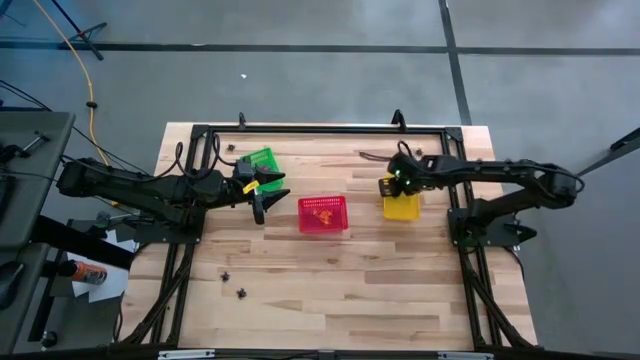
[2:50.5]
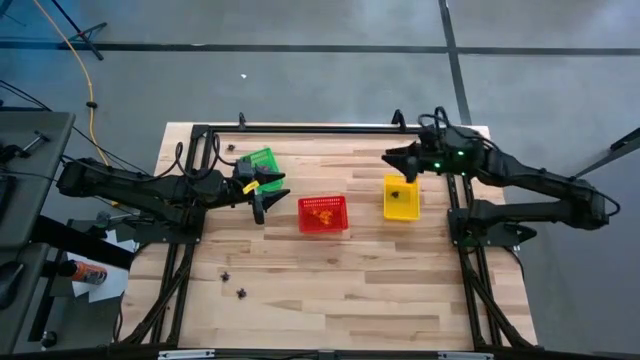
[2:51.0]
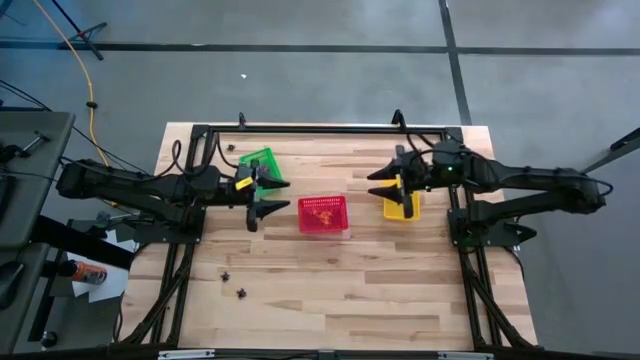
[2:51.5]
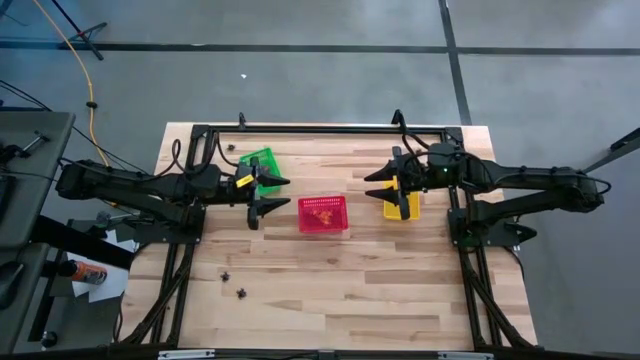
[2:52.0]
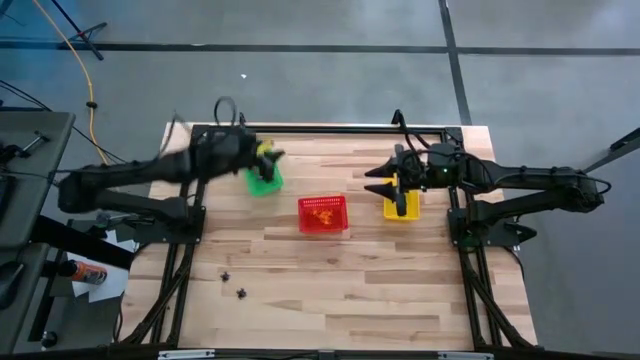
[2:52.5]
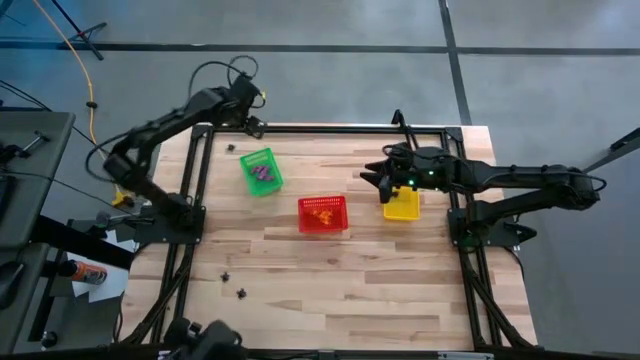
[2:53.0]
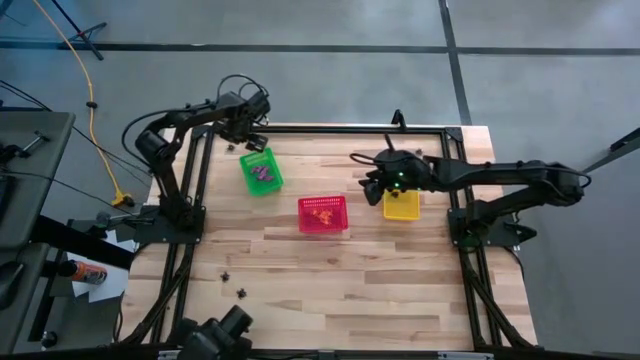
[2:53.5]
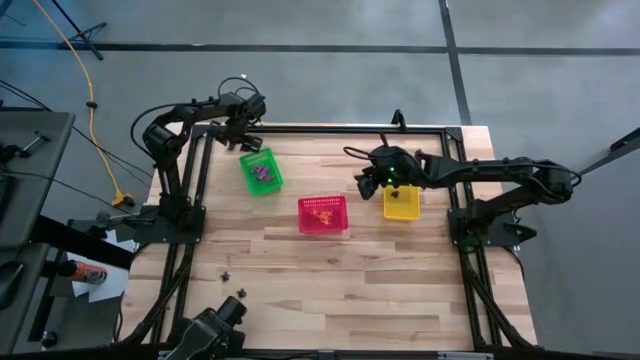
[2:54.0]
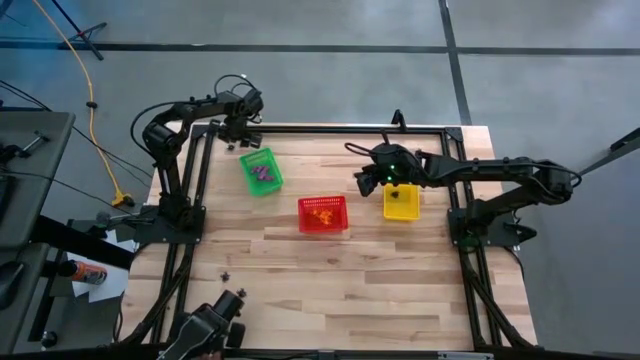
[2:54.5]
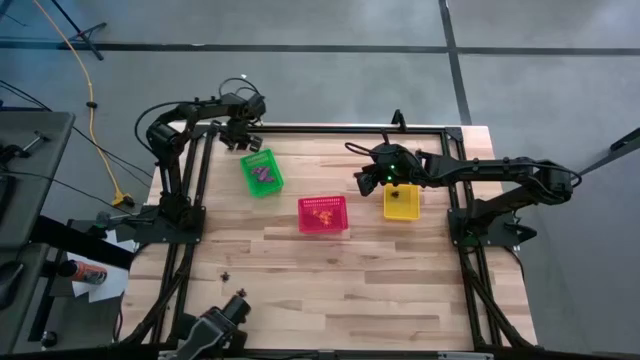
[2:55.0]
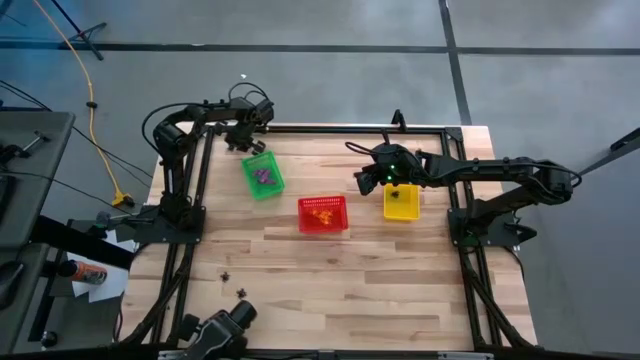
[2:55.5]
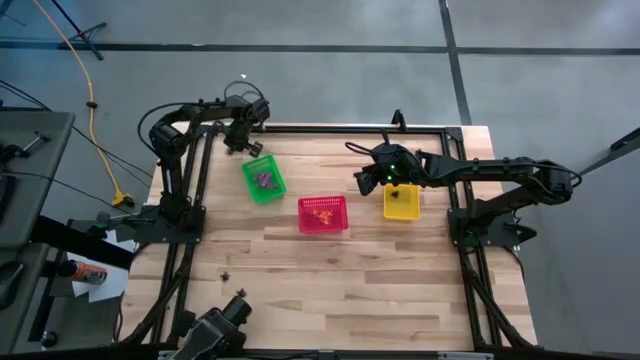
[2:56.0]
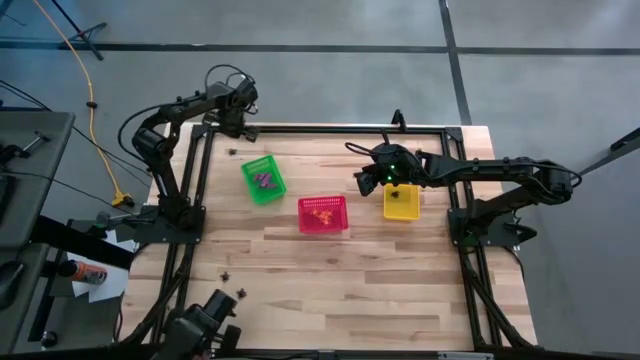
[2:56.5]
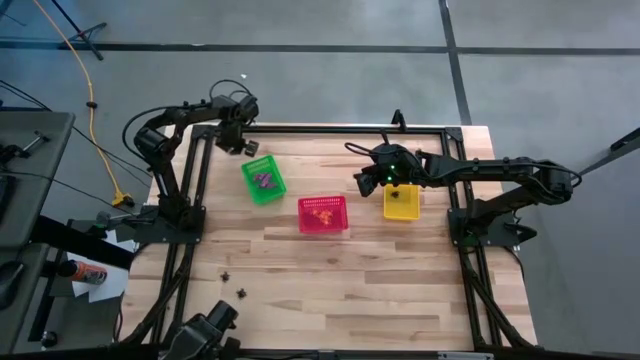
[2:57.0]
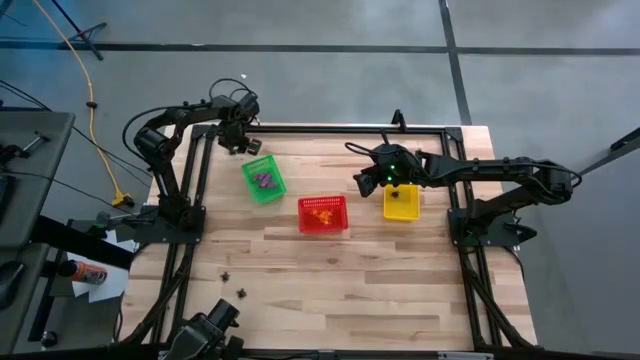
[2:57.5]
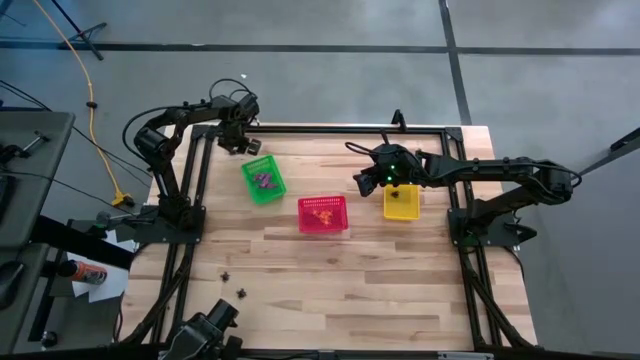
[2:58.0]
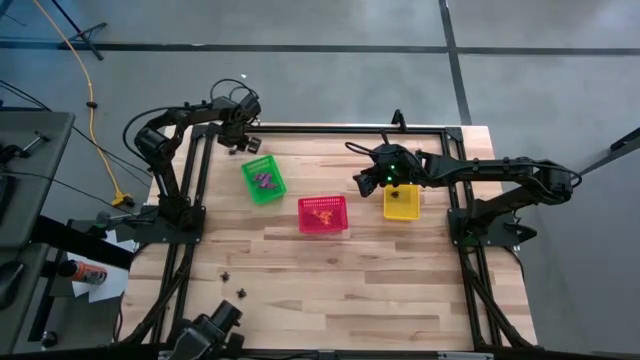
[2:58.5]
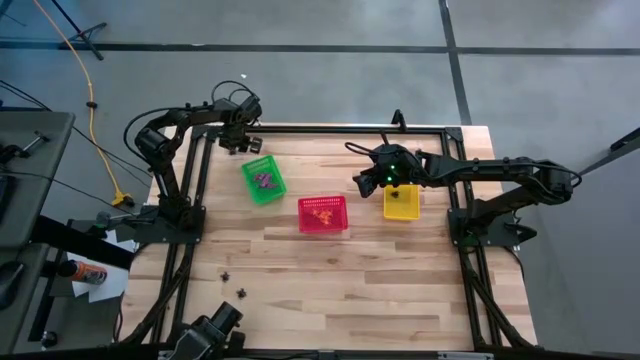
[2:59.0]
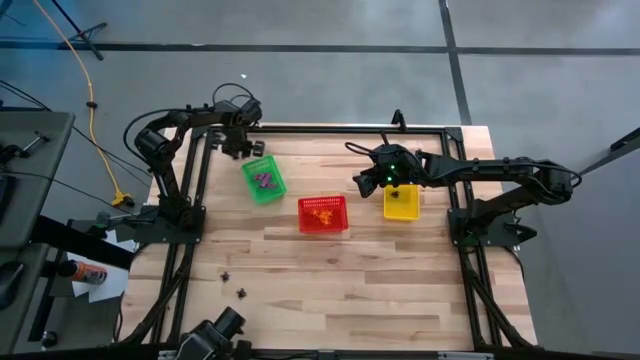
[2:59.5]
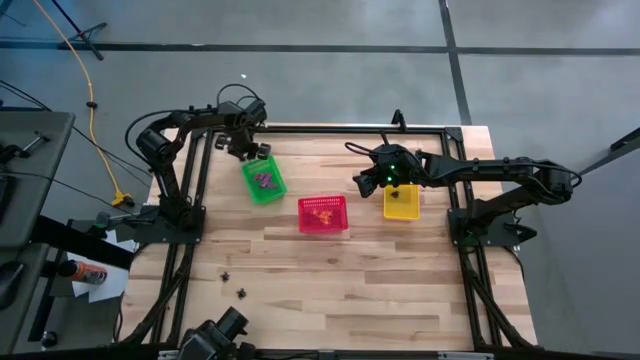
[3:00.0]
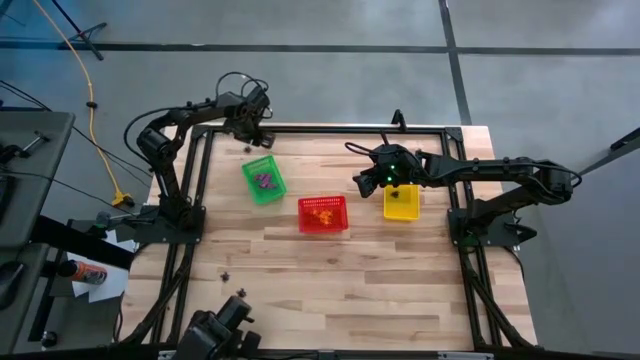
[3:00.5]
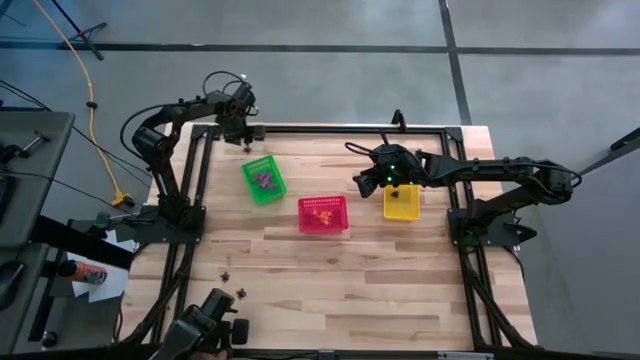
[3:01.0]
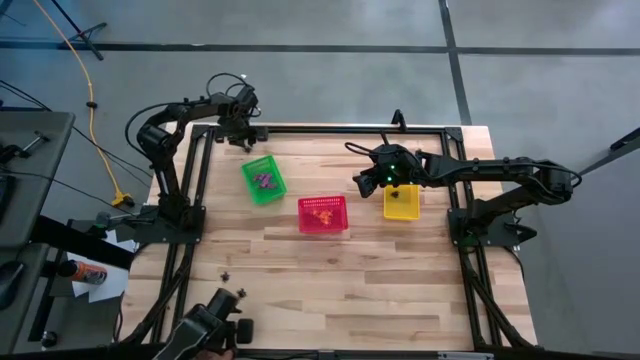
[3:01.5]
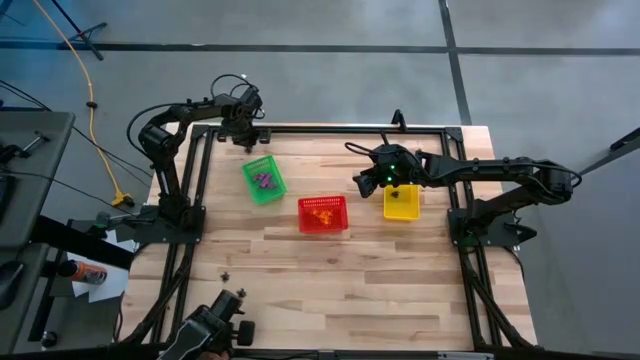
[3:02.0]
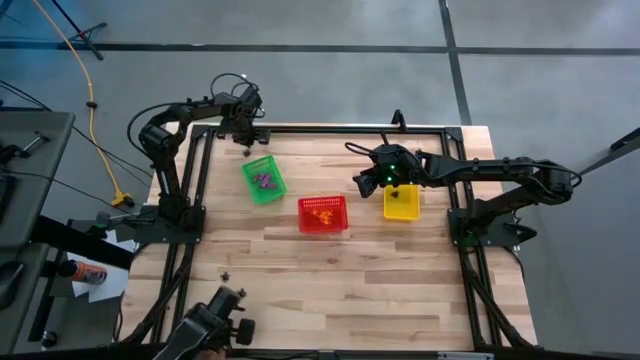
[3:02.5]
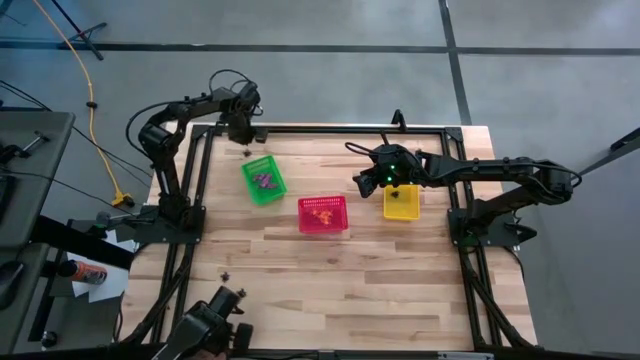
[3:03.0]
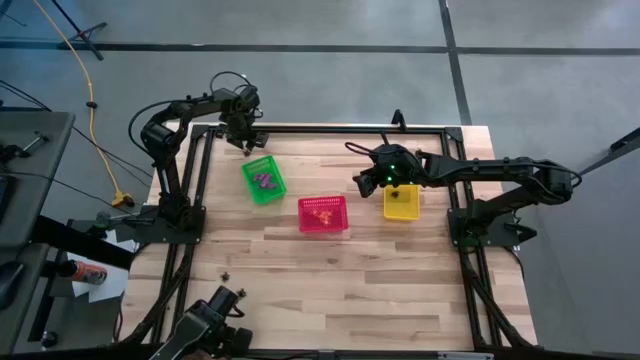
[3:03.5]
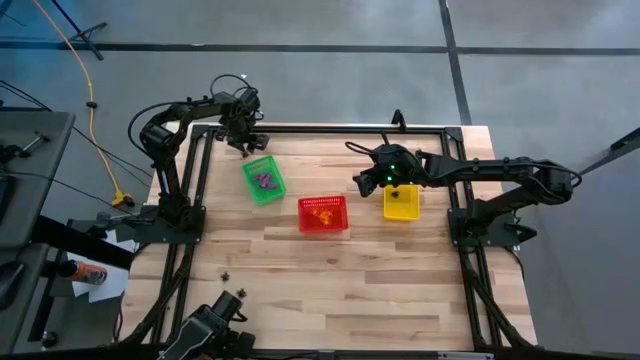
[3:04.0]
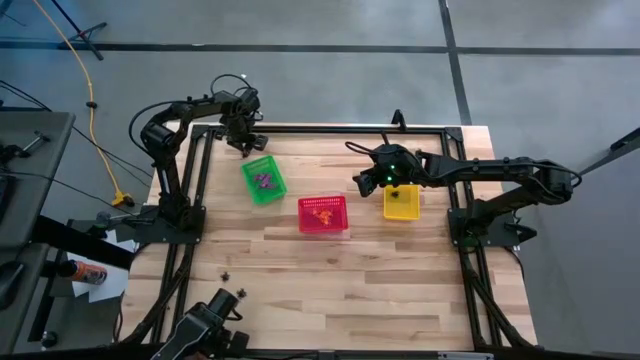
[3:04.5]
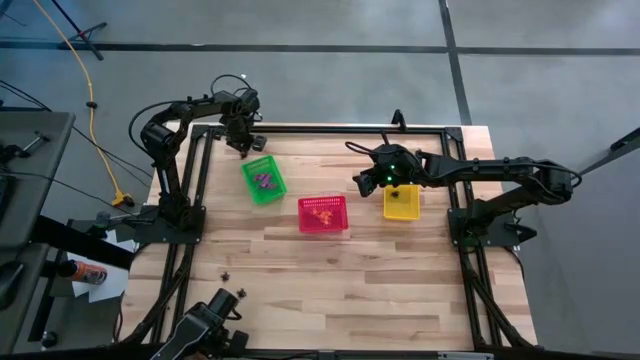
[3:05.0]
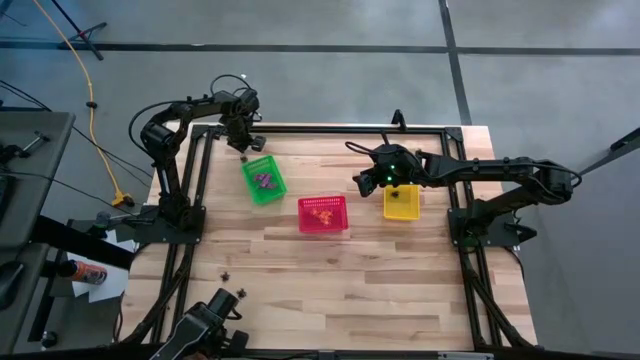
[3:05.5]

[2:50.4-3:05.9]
Task: Sort Halloween decoration
Put the black spider toy into the yellow bin

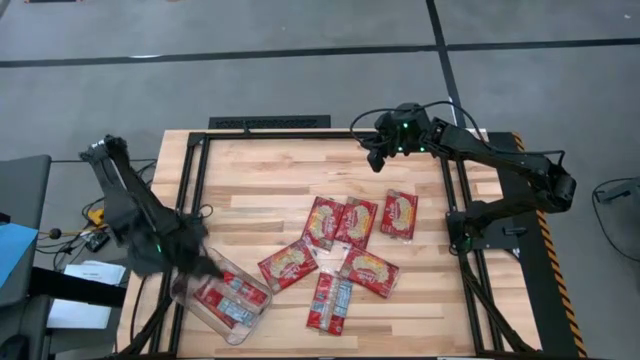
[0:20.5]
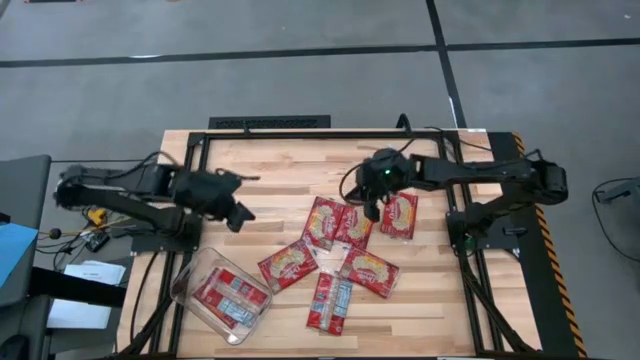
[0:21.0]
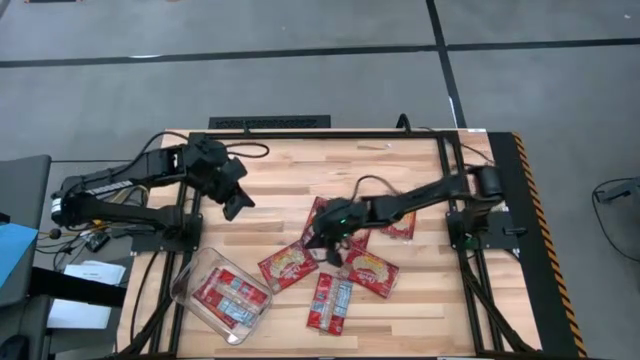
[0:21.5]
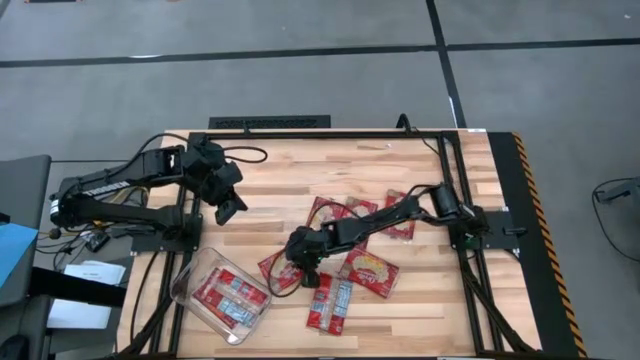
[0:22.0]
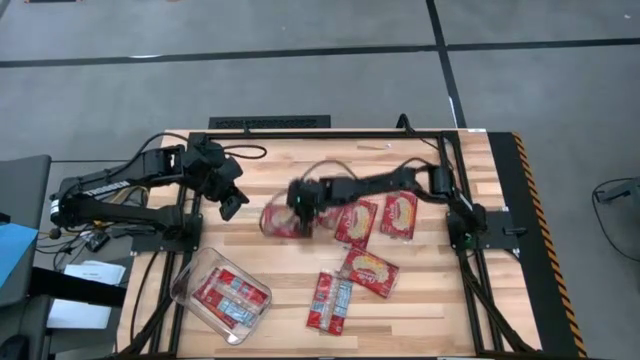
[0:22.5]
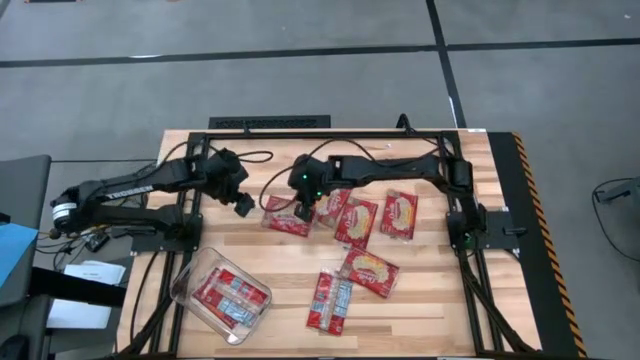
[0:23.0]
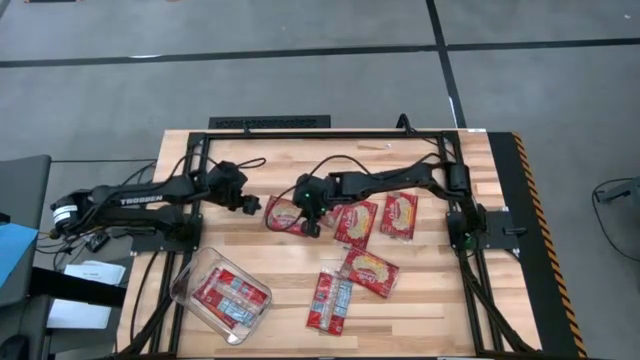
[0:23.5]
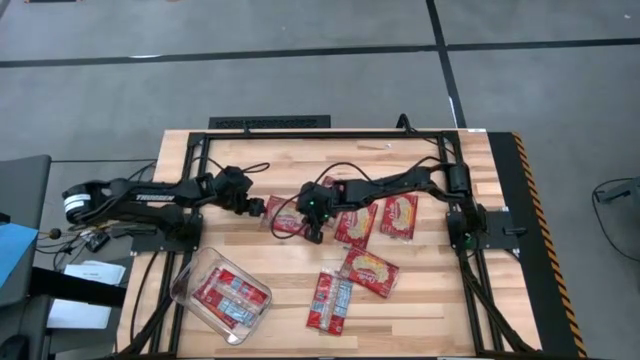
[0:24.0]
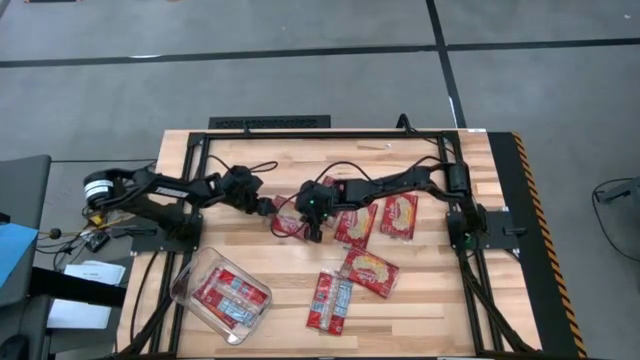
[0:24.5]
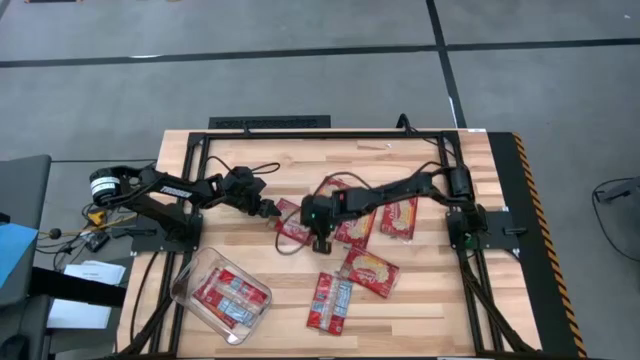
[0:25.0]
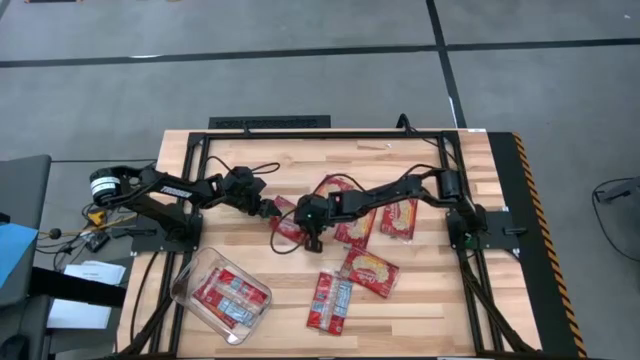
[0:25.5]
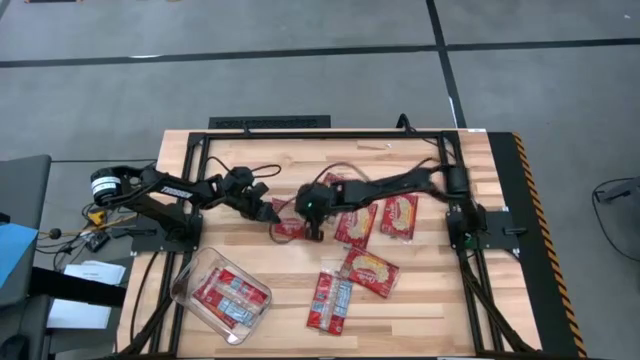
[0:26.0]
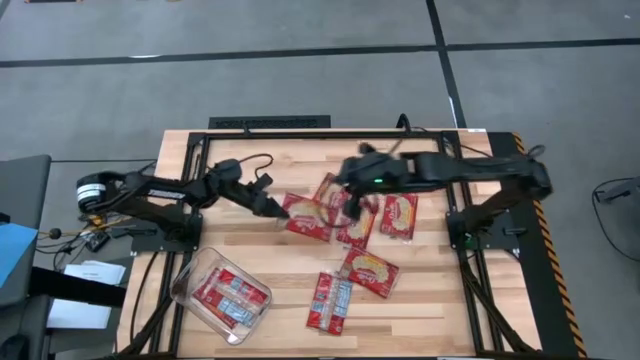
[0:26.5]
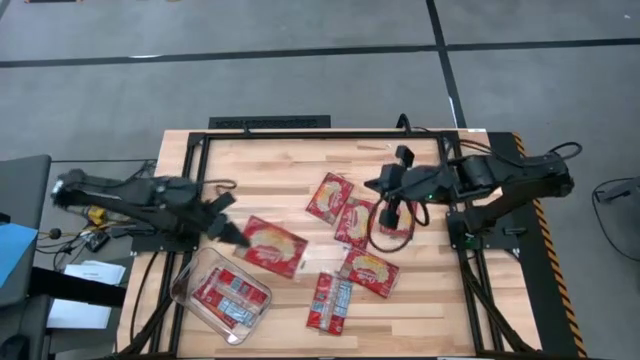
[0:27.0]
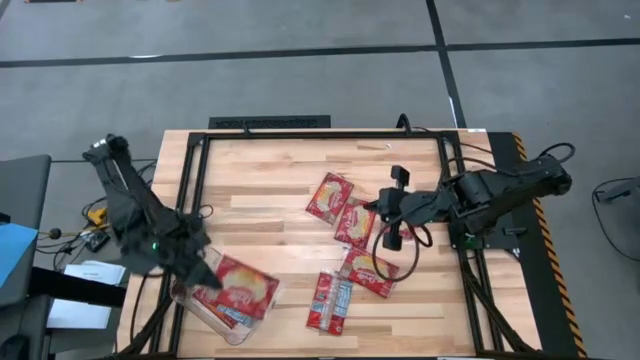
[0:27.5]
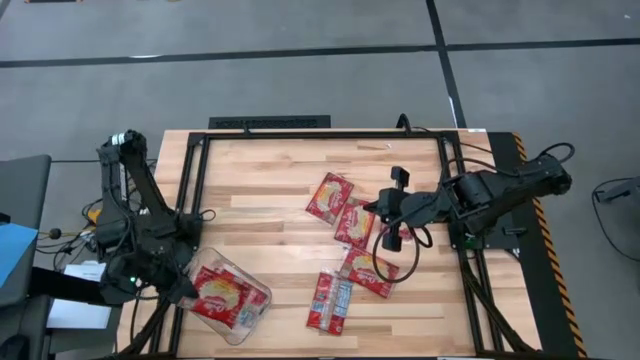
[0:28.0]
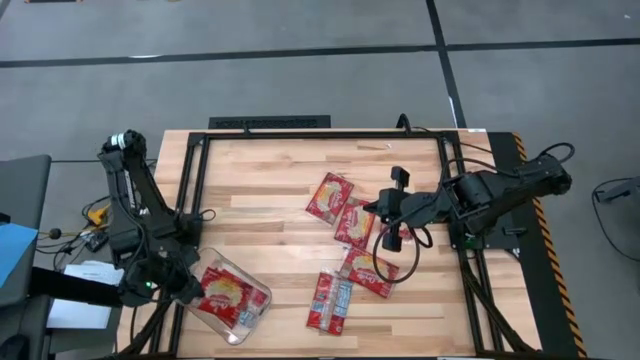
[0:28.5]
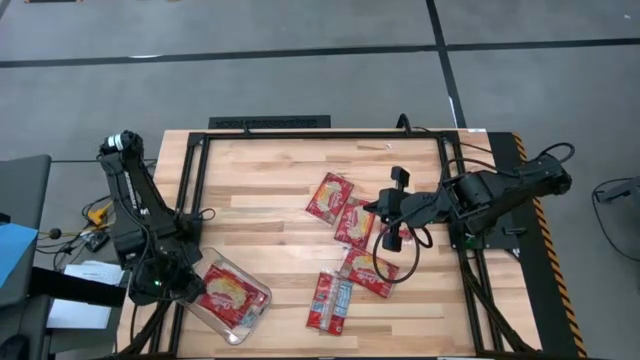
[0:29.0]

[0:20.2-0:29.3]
Task: Sort popcorn bags into baskets
Put the red popcorn bag into the transparent bin
